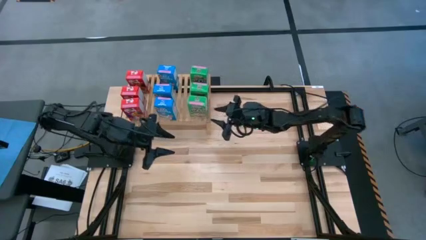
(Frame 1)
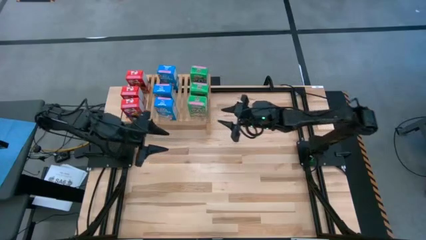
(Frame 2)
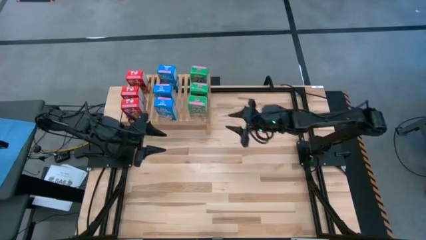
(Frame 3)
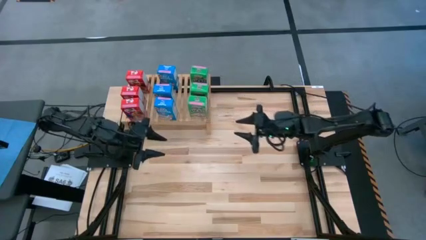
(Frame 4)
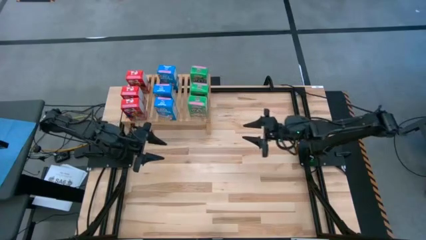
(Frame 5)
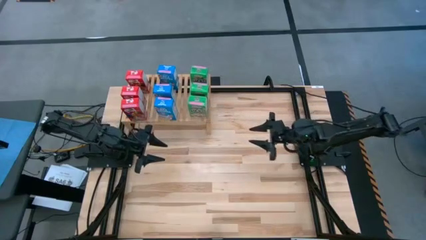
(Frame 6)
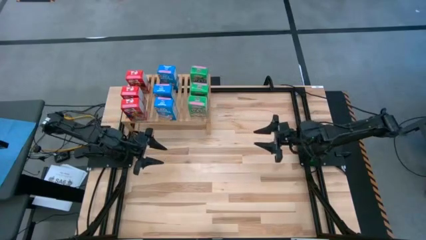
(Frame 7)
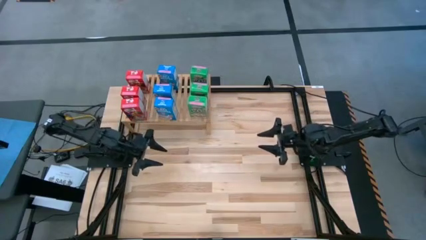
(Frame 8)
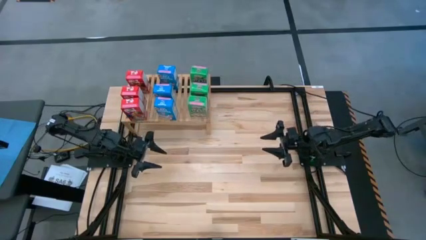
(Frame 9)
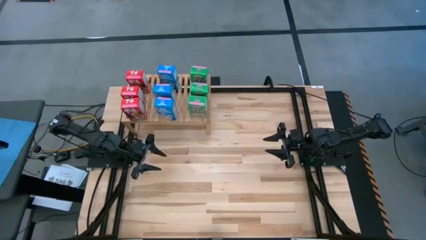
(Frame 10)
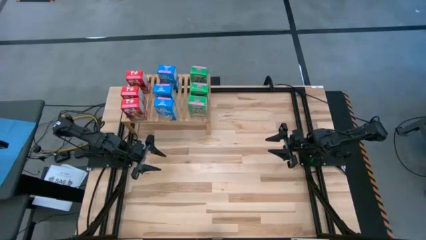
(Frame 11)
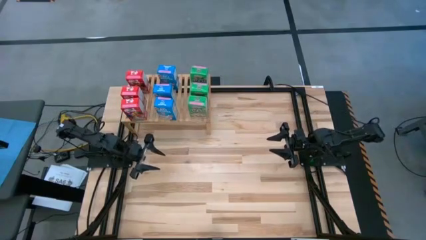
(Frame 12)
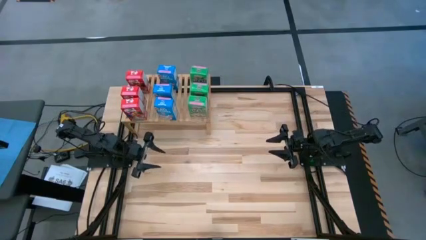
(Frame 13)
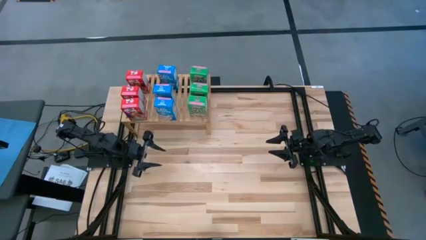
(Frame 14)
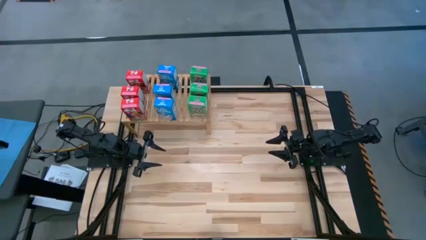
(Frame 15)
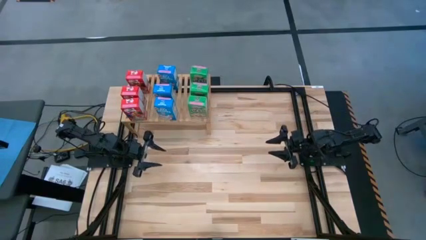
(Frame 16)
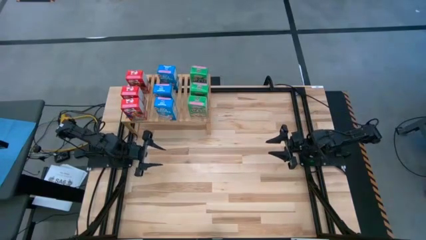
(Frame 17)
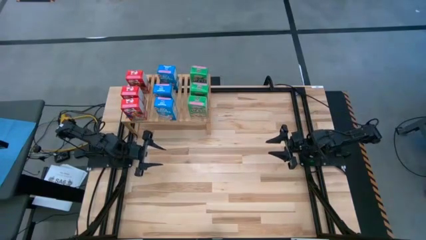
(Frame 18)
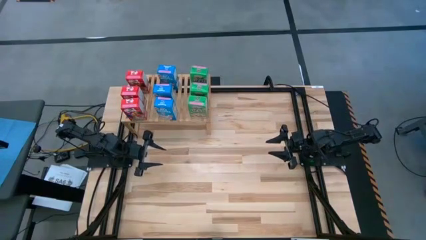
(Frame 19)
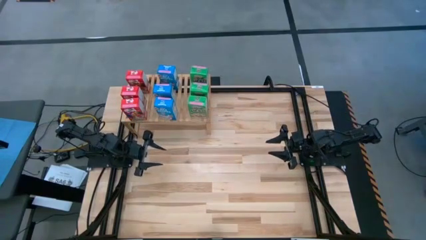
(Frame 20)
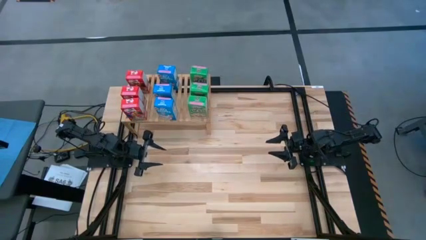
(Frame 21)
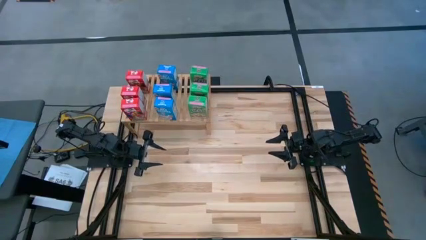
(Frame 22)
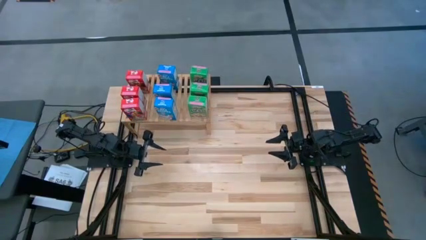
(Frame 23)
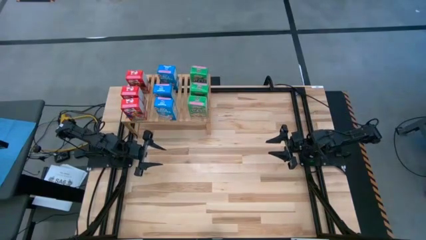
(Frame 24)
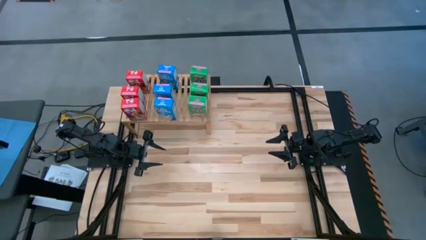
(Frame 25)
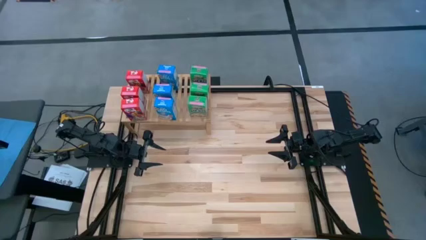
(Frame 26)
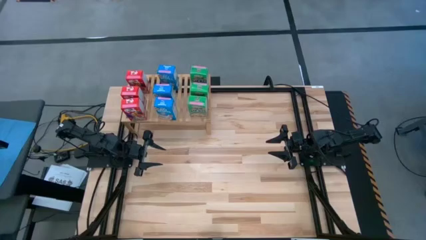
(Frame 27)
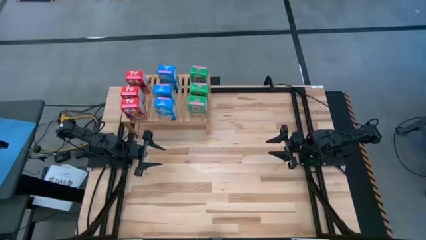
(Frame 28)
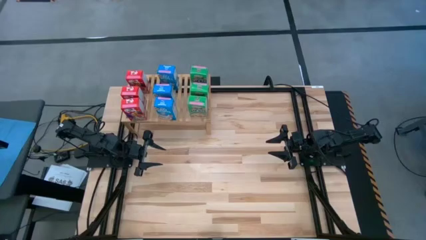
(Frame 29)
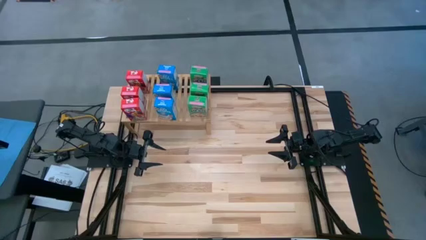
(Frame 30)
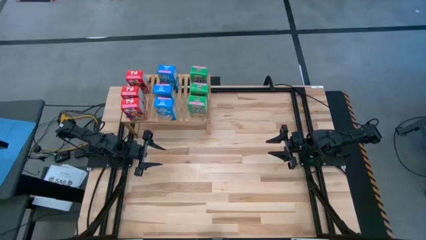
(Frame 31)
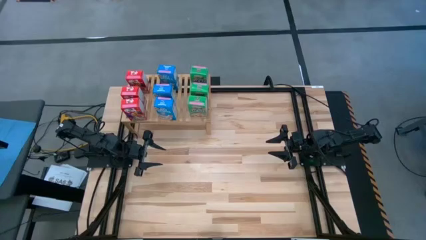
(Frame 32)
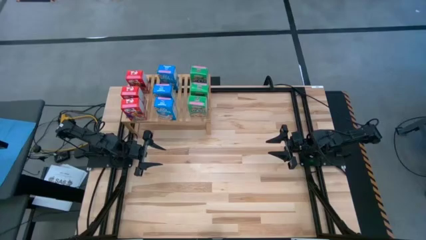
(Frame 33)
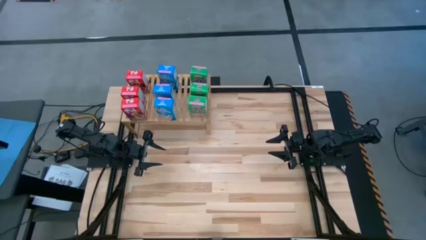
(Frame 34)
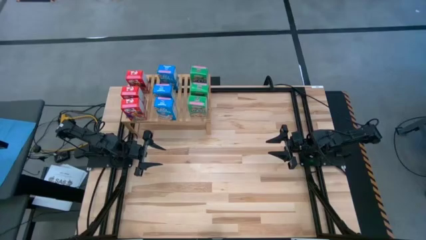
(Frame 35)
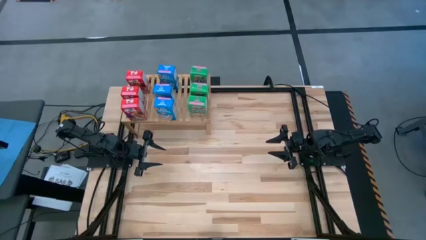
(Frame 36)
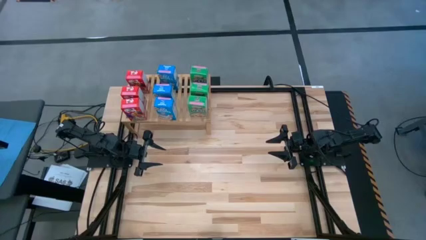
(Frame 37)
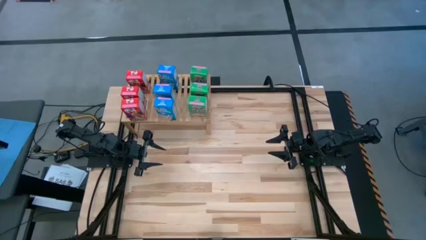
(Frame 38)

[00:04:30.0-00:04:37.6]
Task: Stack cereal on shelf
Return to Home Position

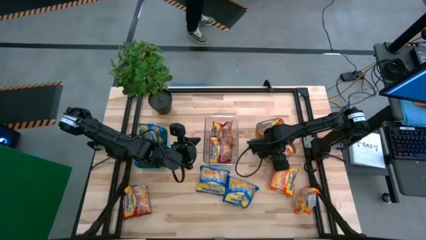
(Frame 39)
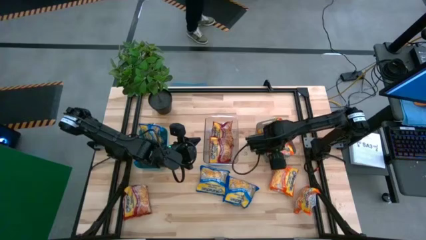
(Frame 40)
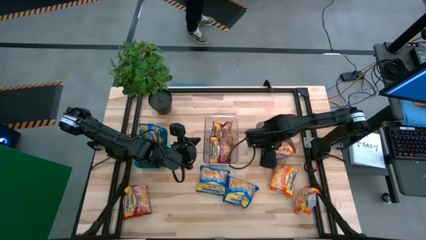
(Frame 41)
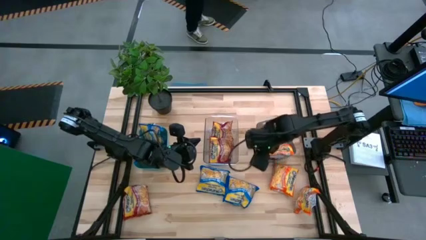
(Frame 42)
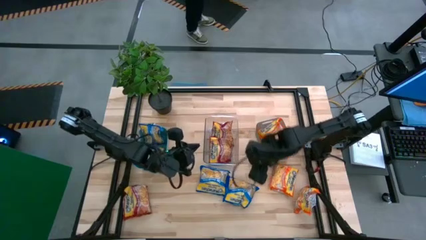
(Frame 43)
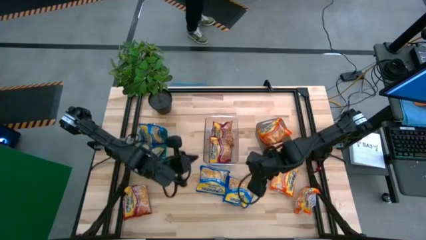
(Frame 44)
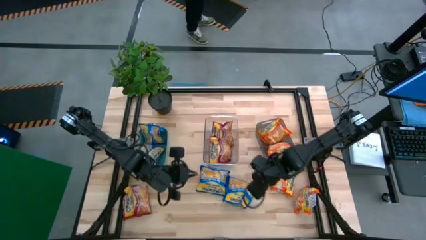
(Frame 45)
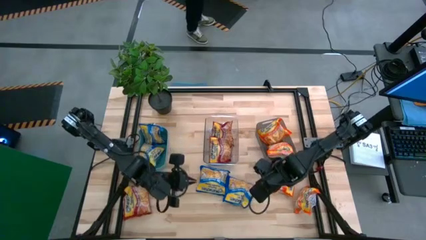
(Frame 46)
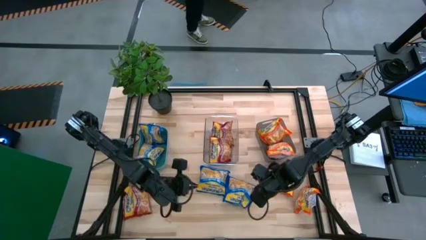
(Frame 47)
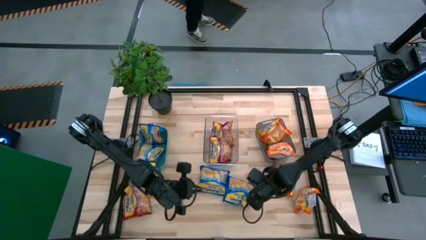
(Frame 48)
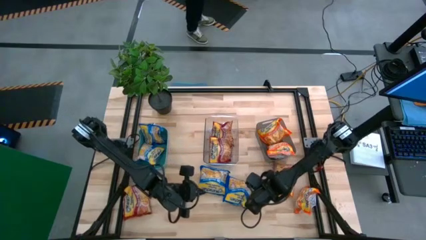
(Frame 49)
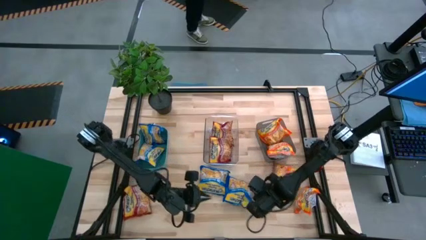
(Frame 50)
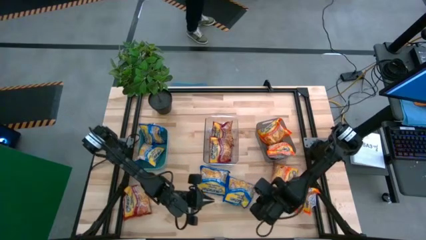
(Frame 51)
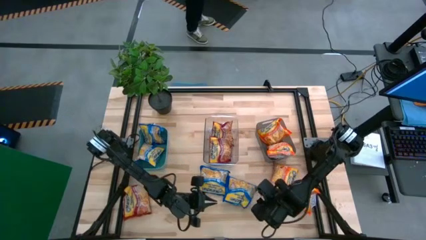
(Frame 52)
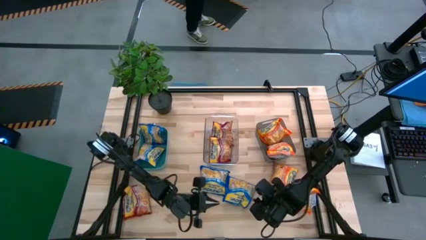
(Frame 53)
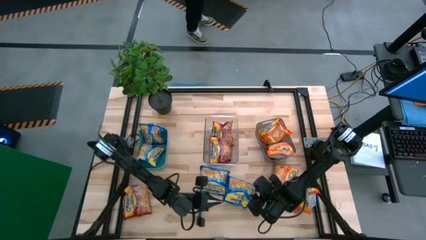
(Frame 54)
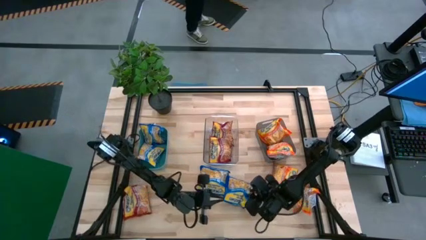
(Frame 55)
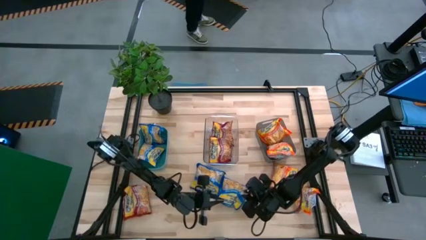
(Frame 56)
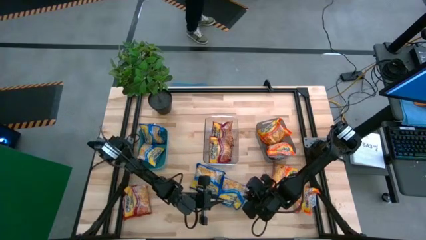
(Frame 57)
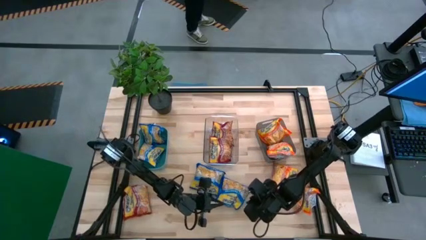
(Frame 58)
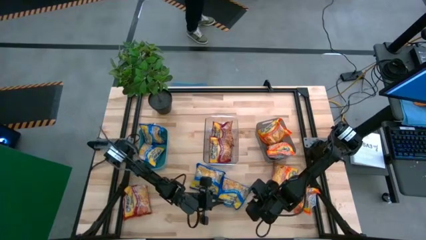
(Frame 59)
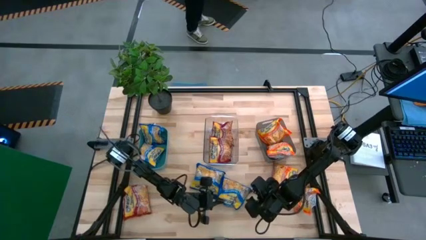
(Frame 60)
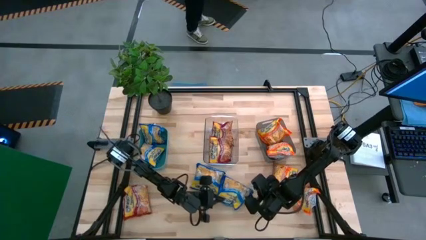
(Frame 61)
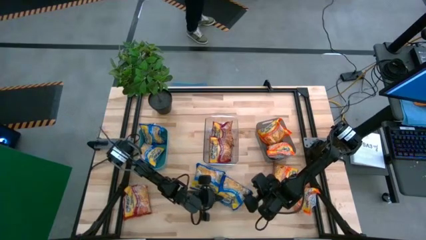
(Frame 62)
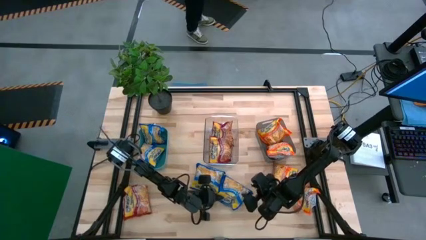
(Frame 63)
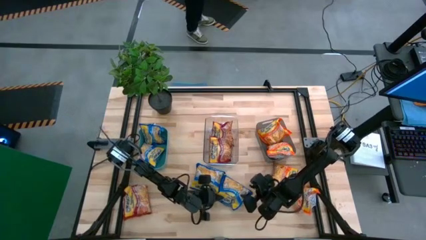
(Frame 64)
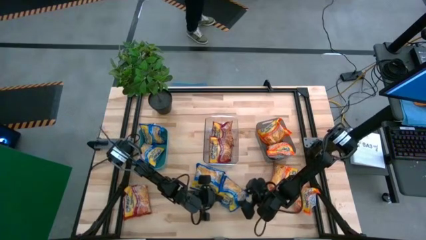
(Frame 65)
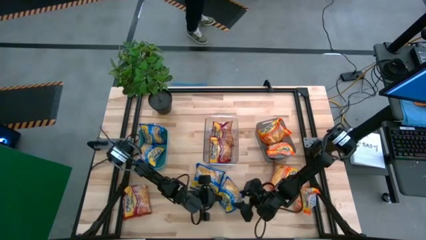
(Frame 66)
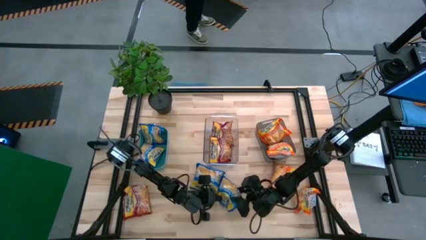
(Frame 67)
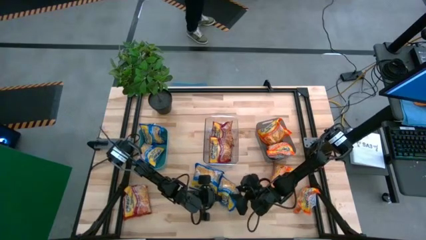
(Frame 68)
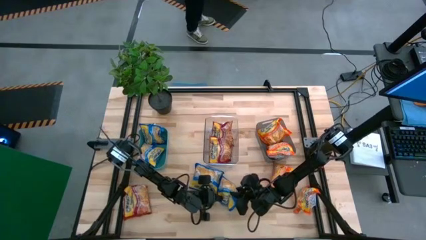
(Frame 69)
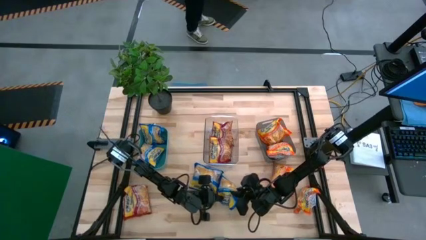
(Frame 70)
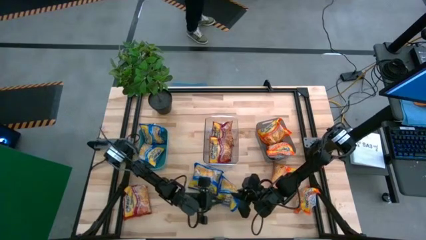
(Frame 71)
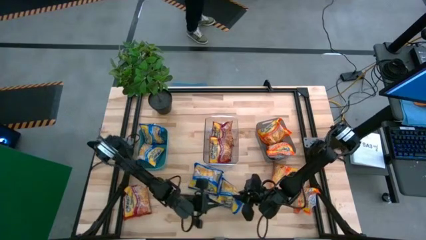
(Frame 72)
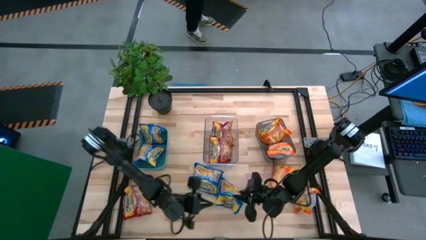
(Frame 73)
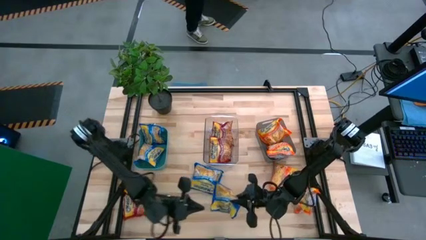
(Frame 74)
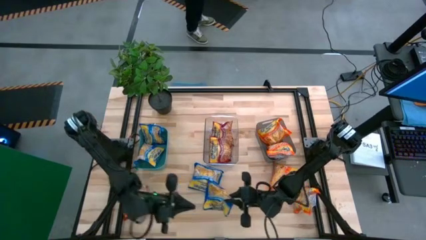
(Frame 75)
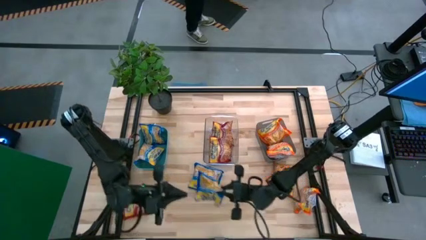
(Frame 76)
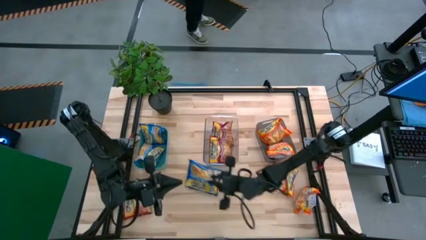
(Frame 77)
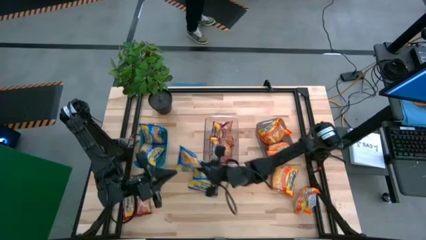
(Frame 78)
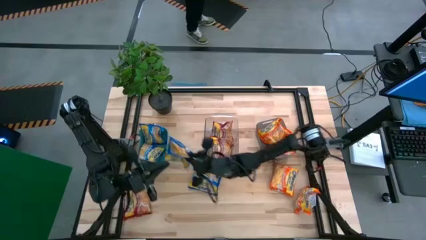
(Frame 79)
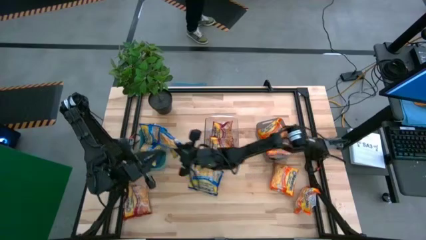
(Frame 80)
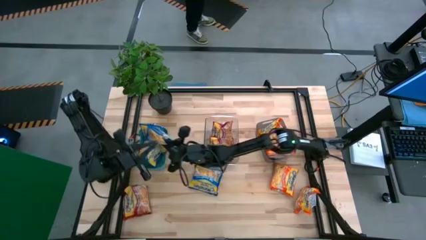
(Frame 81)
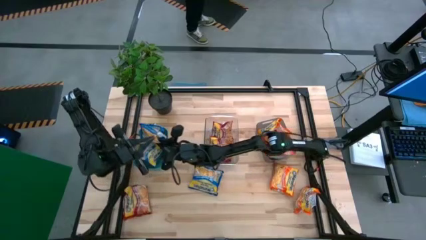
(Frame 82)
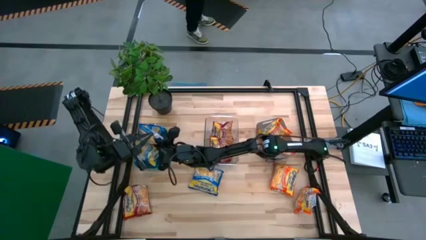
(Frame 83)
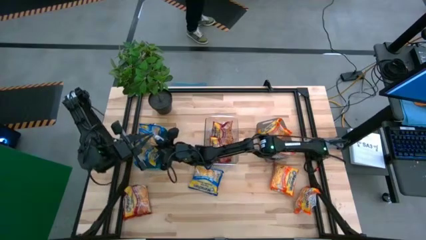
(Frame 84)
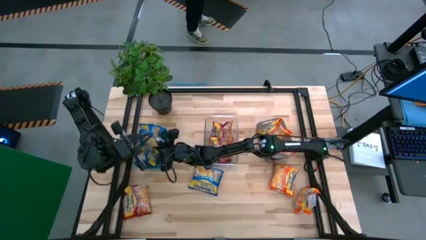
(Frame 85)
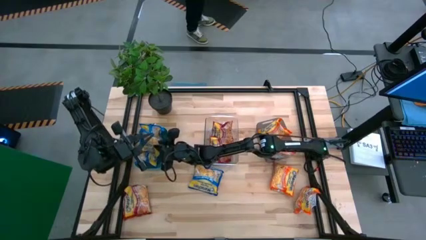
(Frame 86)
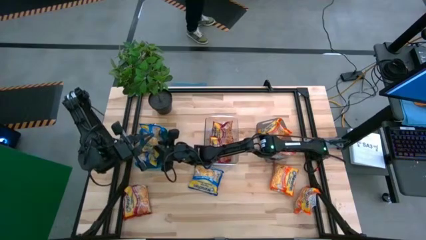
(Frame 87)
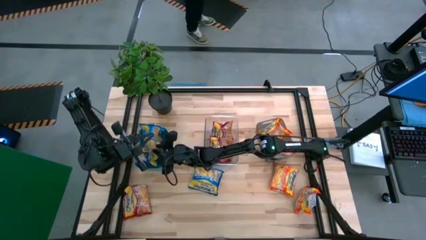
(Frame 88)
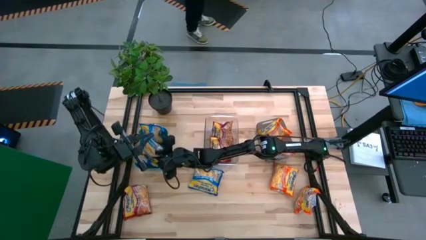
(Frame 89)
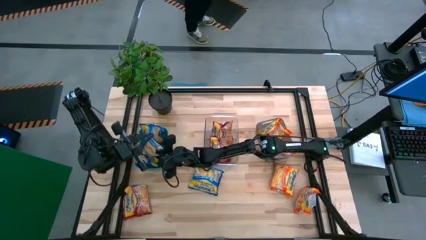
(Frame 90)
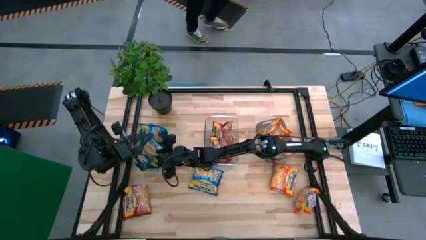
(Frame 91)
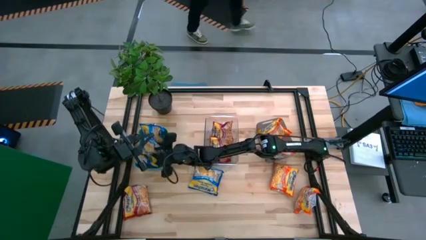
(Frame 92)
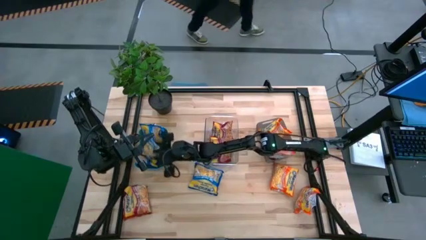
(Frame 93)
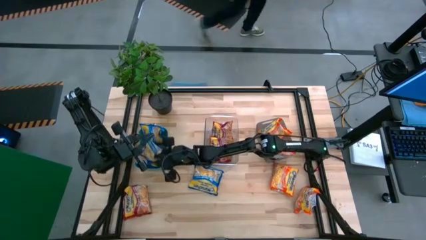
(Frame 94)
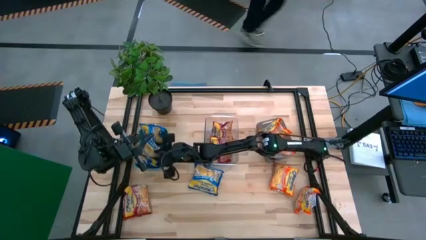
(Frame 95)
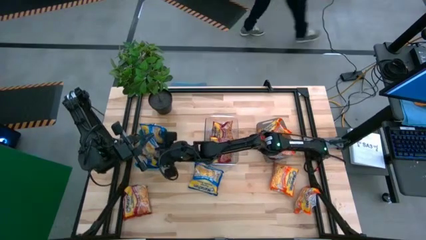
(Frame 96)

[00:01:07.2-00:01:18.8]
Task: Sort Maruchan noodles
Put the blue noodle pack into the green bin
